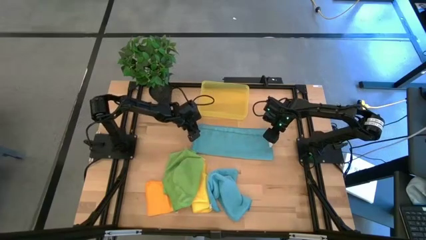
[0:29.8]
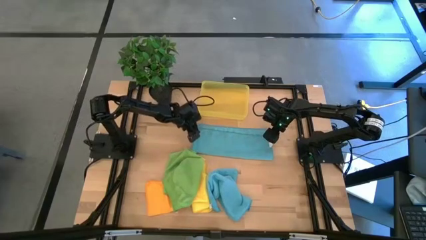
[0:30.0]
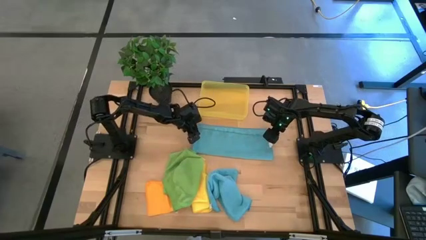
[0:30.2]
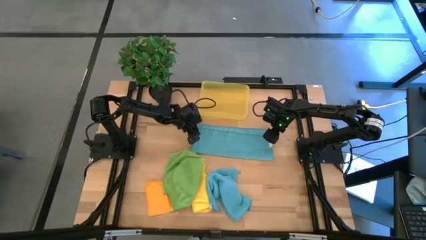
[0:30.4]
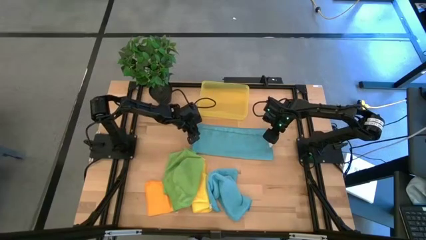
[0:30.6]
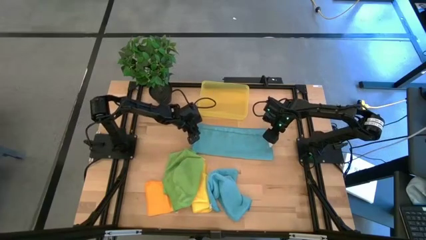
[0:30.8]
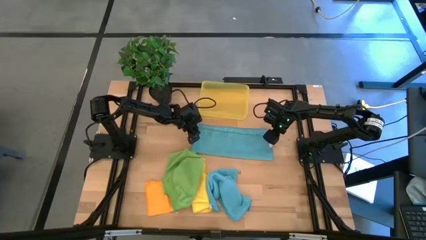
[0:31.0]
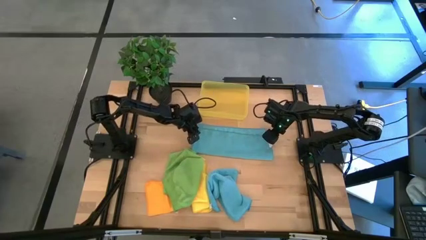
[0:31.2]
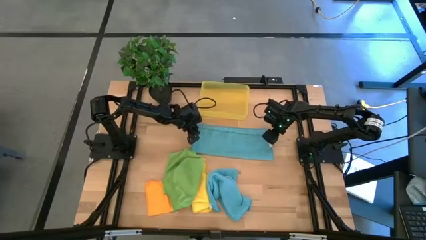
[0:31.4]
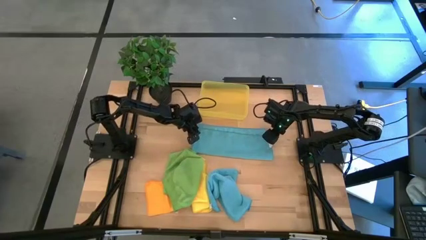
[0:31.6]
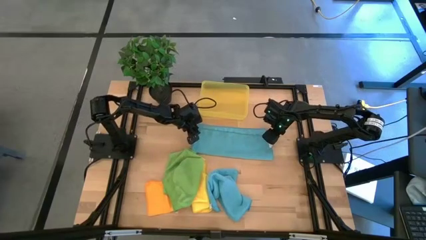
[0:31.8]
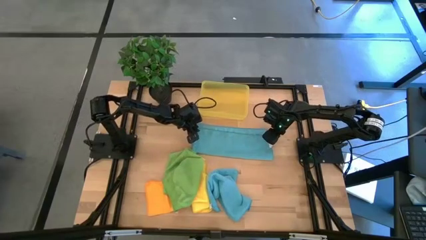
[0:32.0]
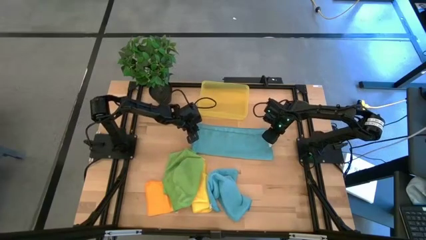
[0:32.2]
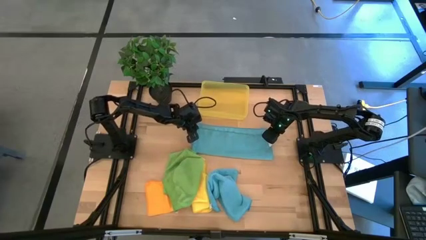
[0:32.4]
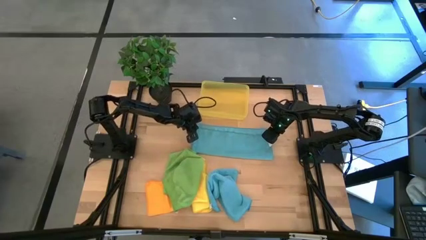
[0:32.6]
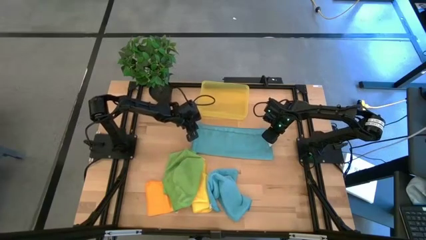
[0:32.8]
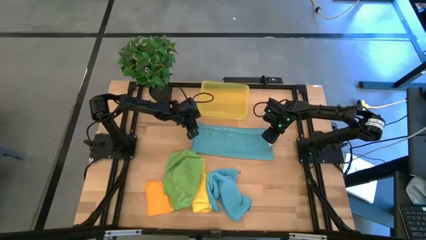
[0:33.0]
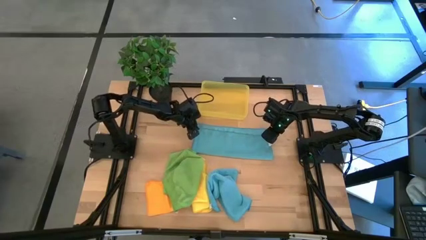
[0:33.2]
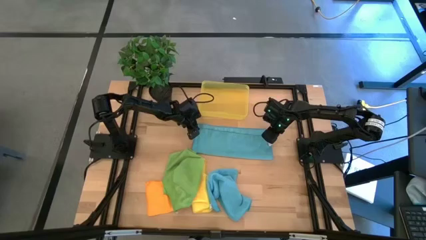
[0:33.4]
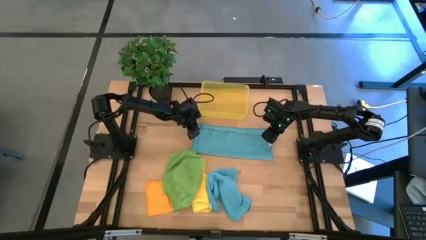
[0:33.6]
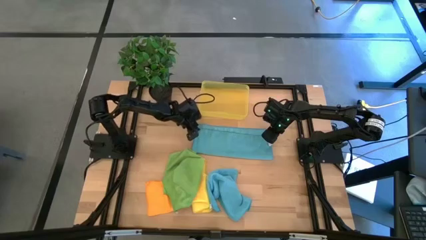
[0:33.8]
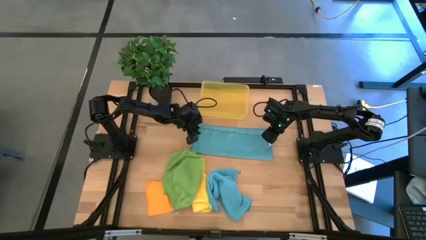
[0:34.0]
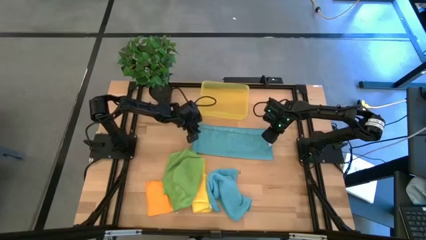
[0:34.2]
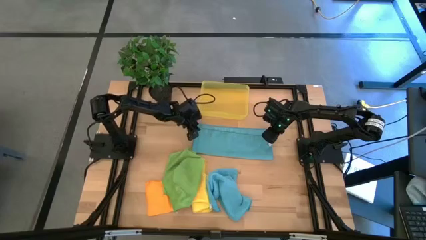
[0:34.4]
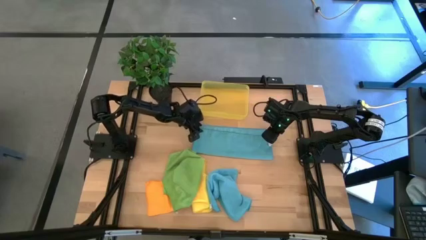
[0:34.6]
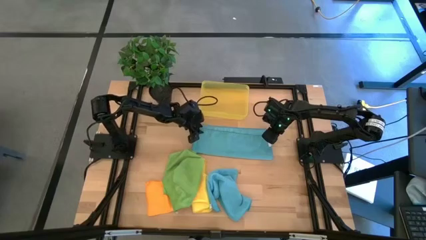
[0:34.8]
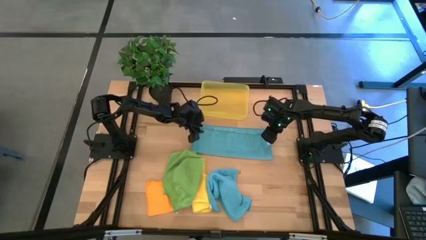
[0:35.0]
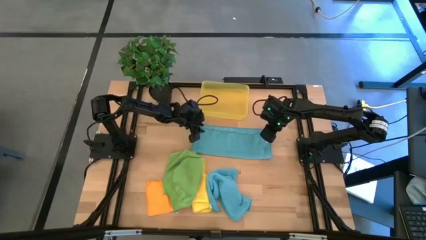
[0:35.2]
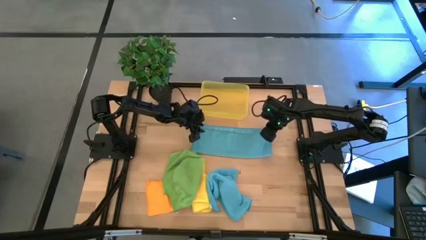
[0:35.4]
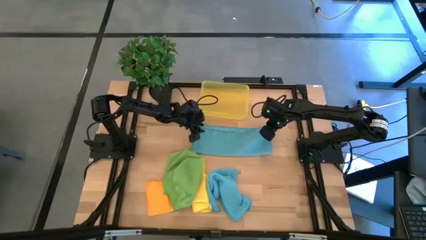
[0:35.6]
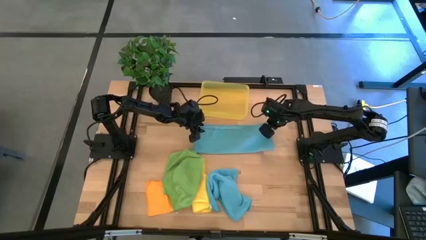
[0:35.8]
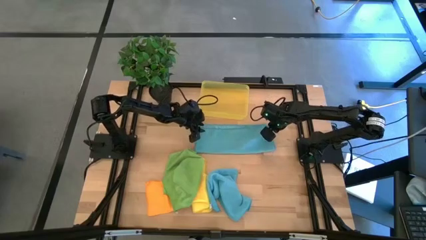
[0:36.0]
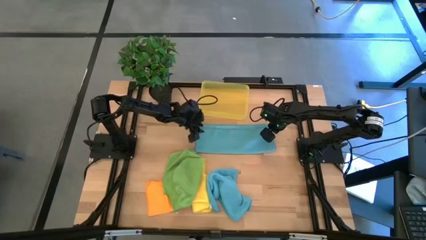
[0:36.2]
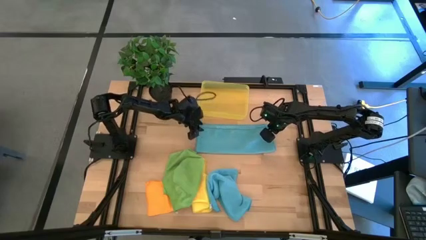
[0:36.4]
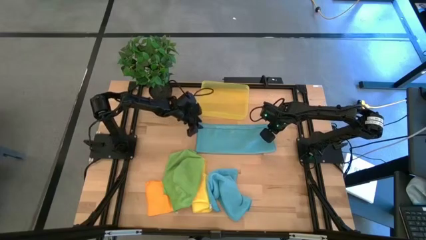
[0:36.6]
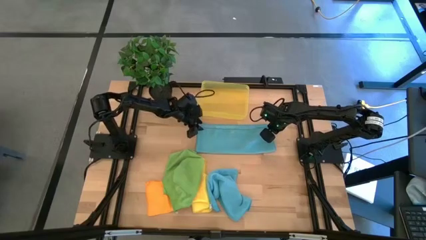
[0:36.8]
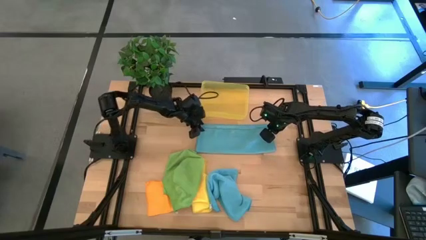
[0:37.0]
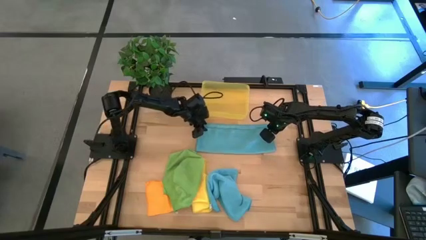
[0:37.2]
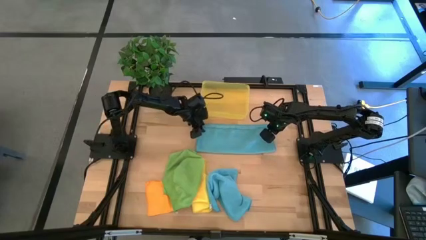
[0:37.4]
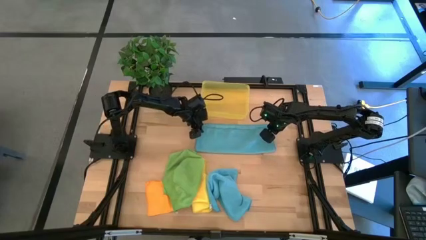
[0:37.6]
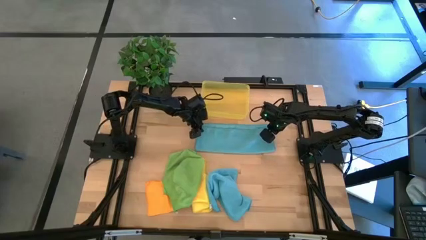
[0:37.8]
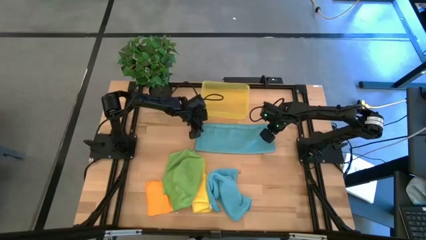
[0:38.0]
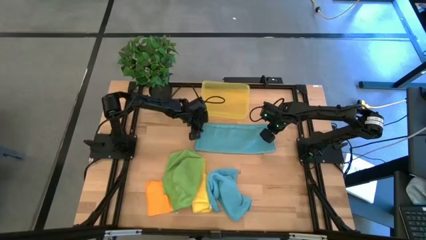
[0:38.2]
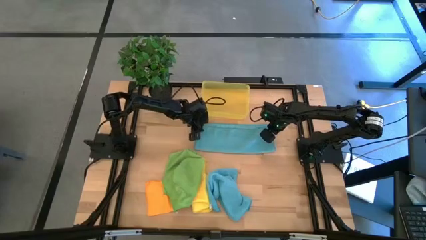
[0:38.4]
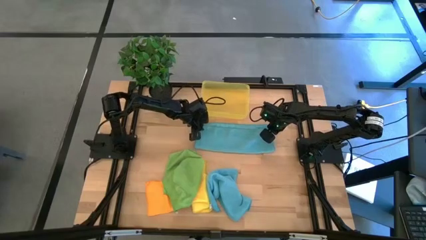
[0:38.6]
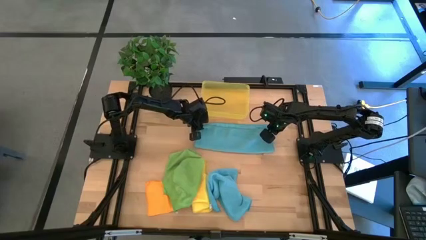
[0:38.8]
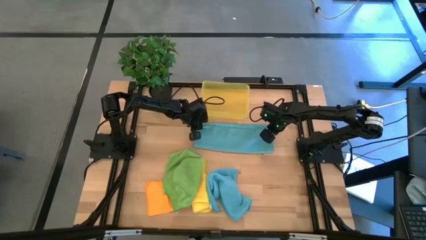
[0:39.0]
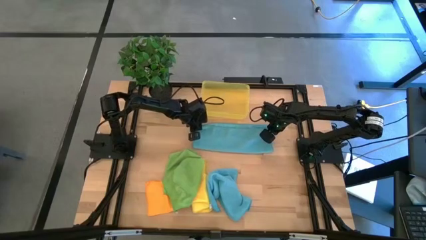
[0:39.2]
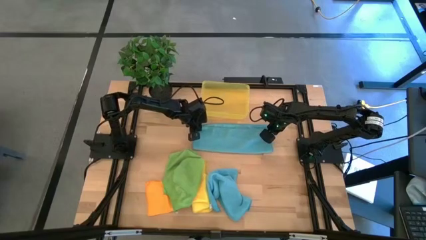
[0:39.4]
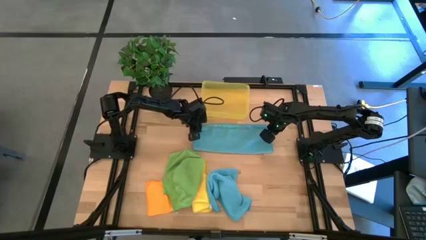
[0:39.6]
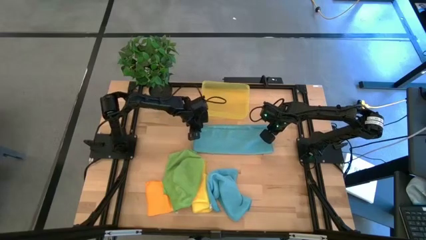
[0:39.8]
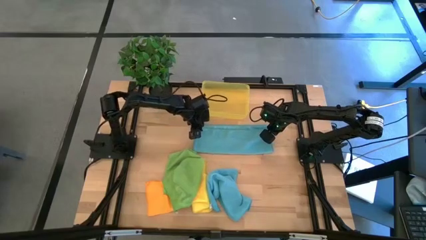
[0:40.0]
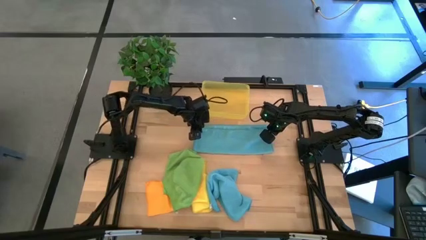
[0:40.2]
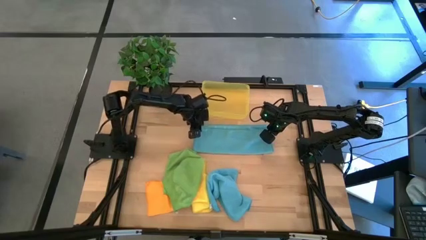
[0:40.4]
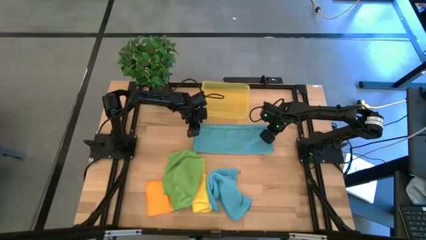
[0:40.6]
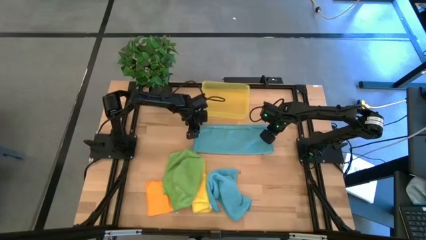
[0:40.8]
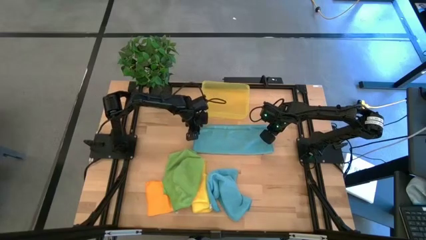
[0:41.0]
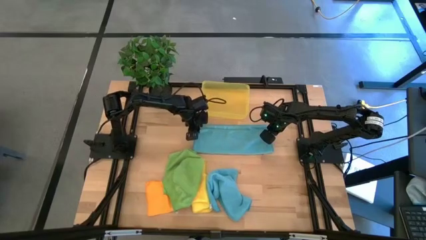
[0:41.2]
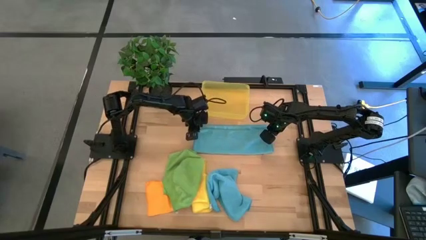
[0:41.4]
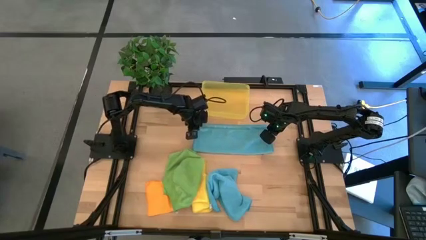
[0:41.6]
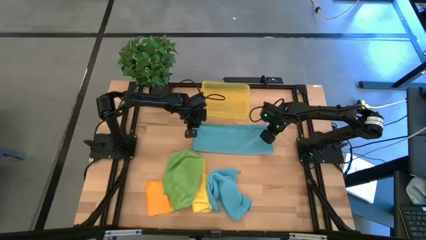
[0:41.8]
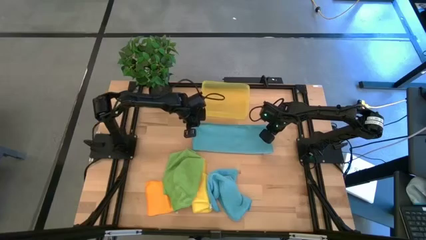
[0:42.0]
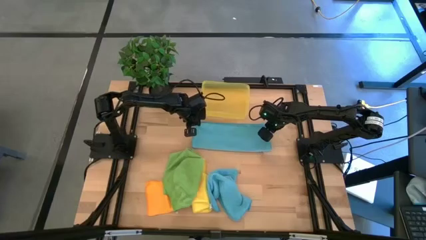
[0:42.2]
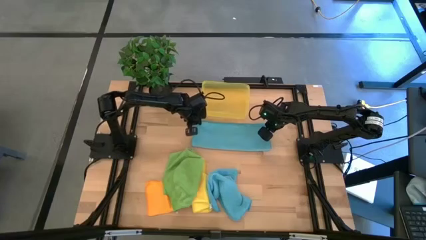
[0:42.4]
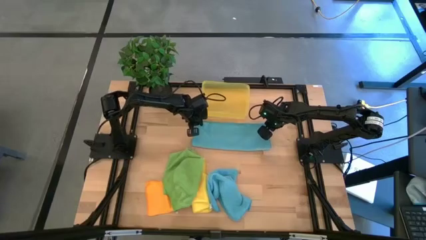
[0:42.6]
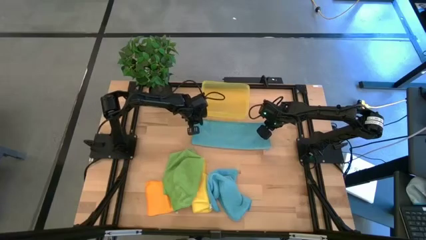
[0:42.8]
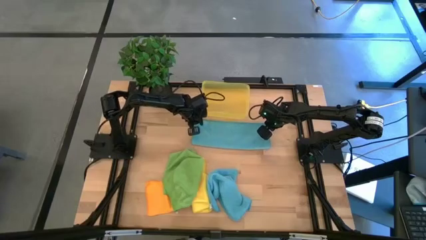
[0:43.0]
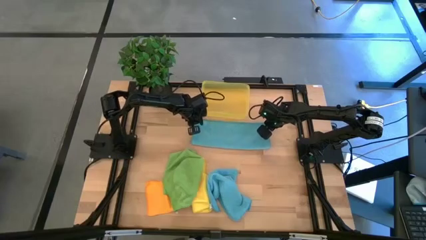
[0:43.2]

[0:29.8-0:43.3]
Task: Fold microfiber towels
Fold the left blue microfiber towel

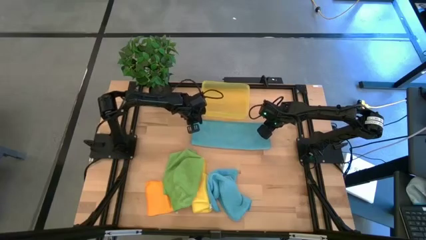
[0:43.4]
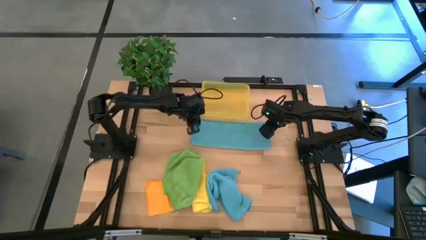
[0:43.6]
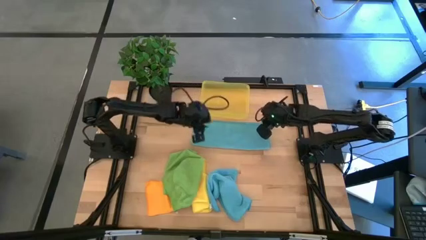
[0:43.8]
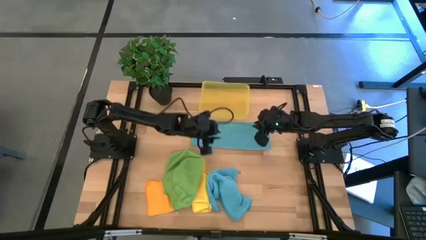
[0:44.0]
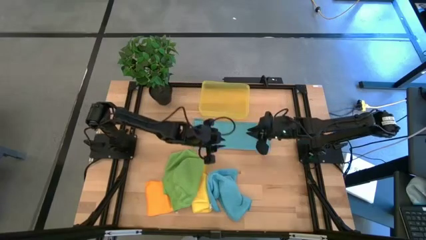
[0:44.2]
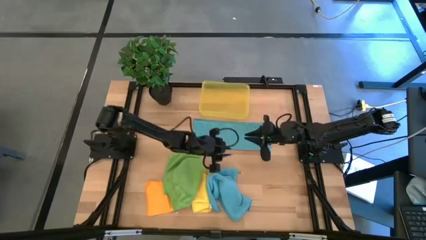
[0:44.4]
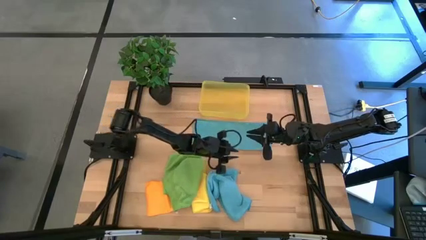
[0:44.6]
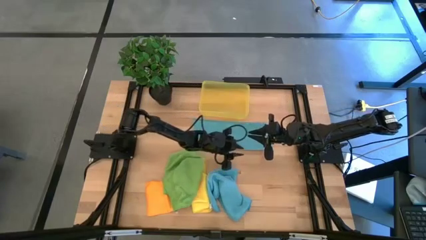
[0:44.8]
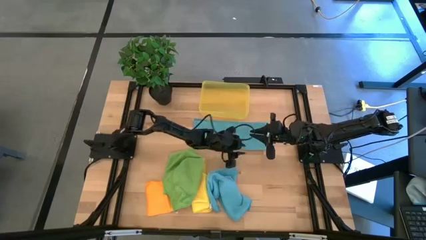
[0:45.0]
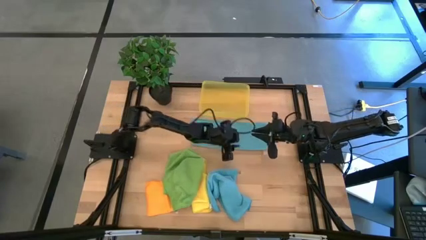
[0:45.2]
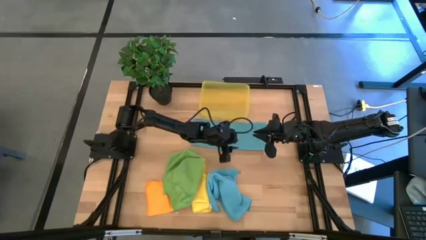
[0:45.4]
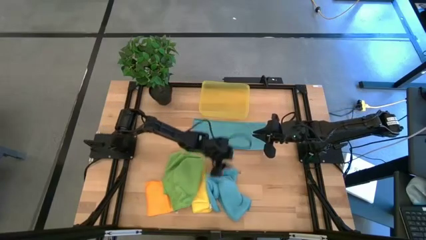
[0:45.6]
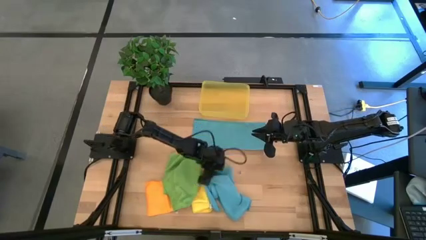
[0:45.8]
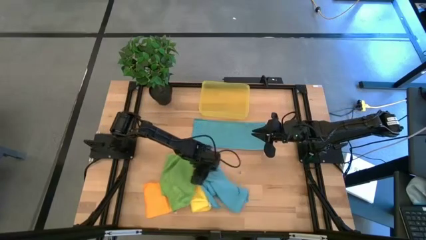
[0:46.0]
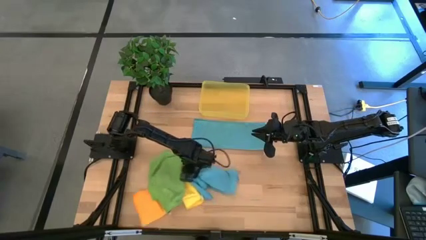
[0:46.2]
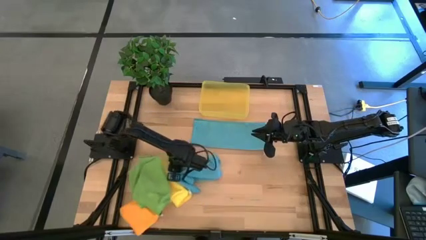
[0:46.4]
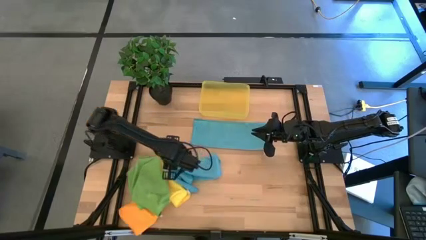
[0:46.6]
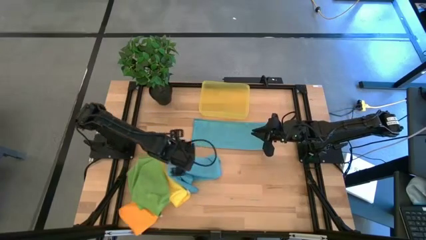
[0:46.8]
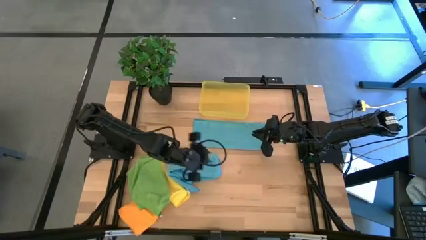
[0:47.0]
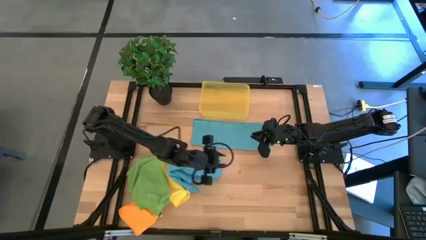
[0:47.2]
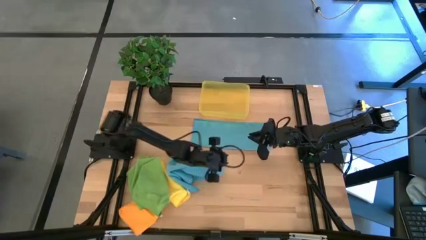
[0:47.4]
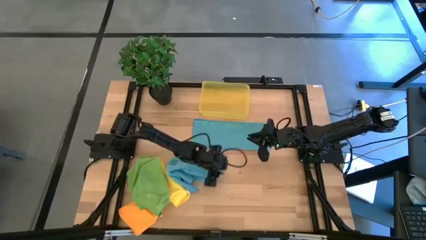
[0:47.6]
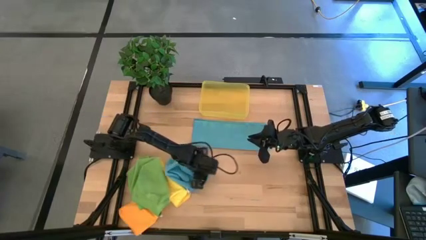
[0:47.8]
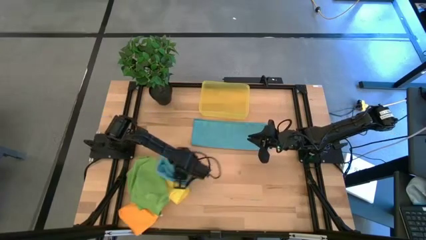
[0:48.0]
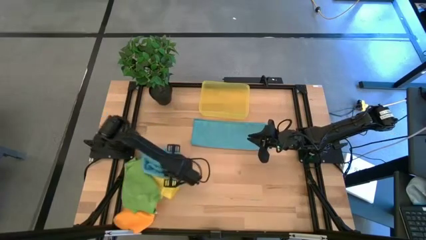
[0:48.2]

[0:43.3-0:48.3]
Fold the left blue microfiber towel
